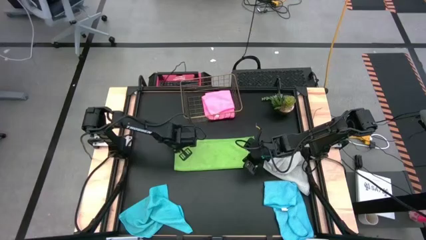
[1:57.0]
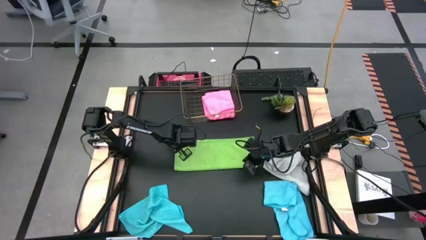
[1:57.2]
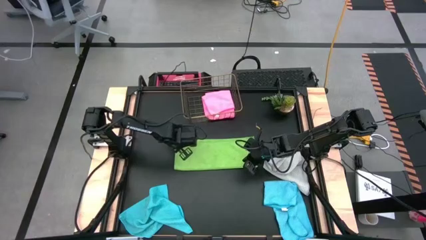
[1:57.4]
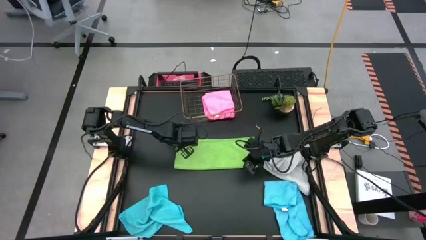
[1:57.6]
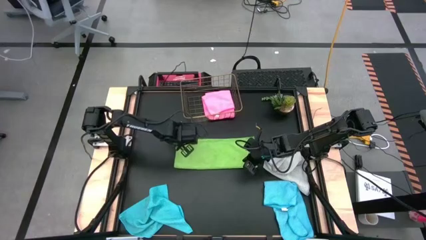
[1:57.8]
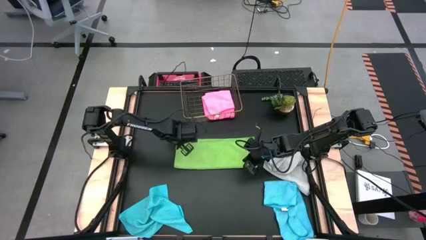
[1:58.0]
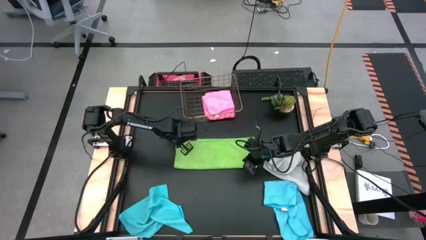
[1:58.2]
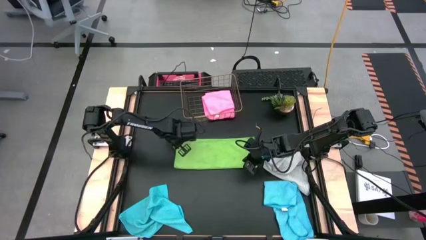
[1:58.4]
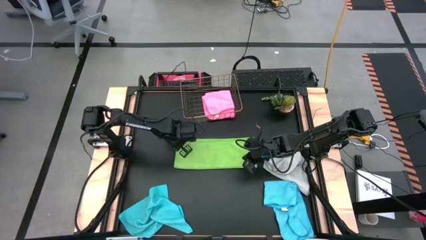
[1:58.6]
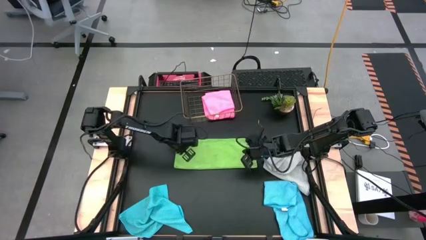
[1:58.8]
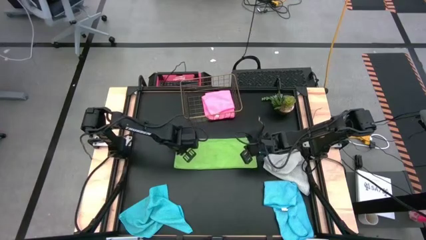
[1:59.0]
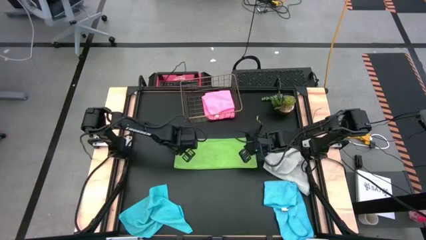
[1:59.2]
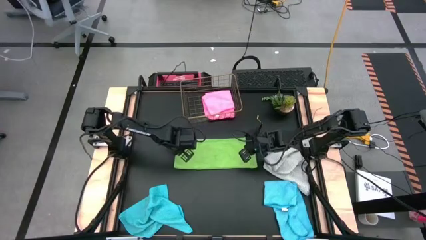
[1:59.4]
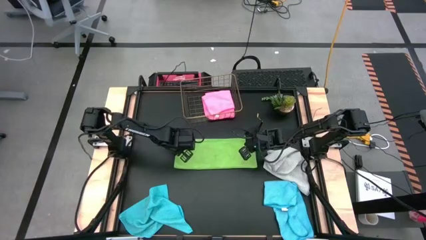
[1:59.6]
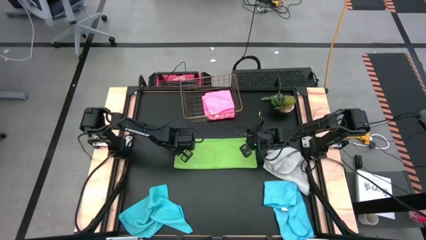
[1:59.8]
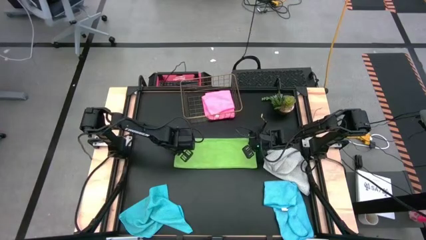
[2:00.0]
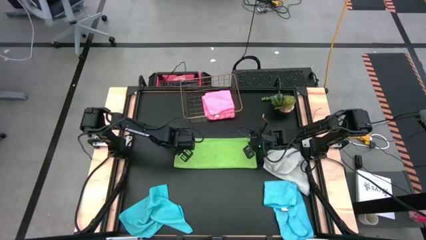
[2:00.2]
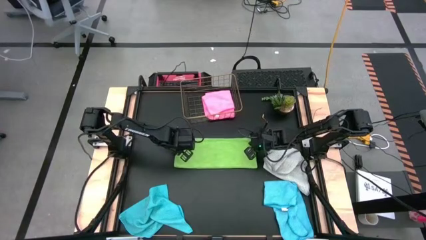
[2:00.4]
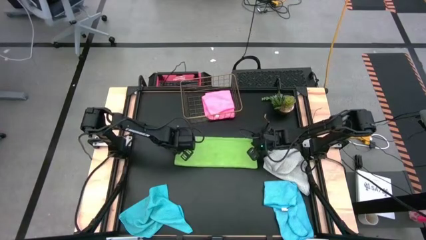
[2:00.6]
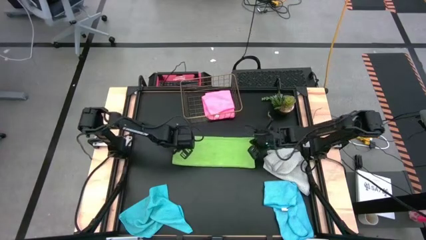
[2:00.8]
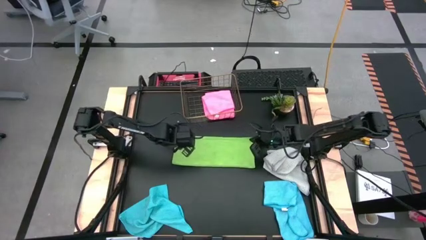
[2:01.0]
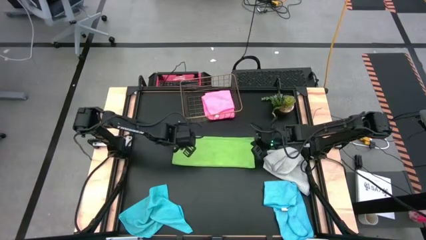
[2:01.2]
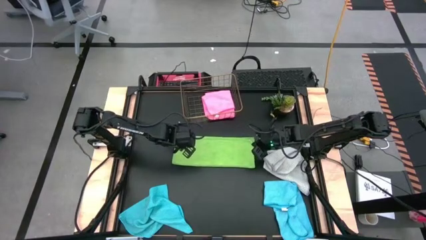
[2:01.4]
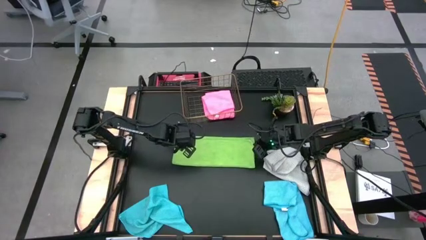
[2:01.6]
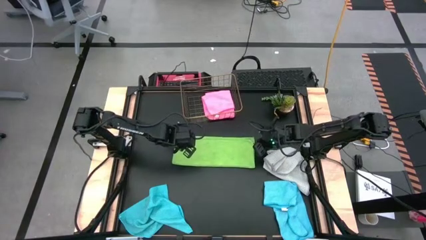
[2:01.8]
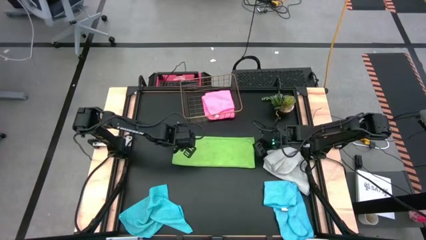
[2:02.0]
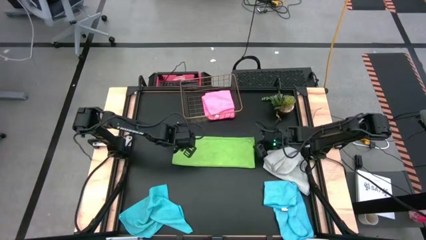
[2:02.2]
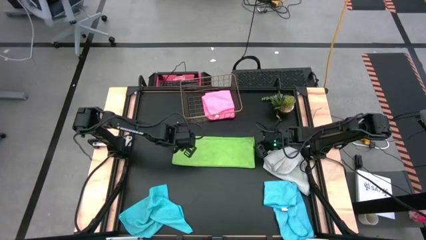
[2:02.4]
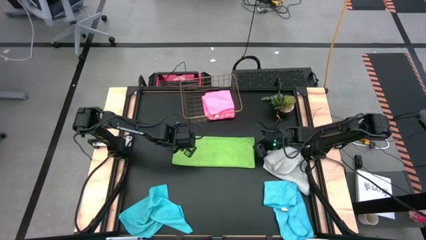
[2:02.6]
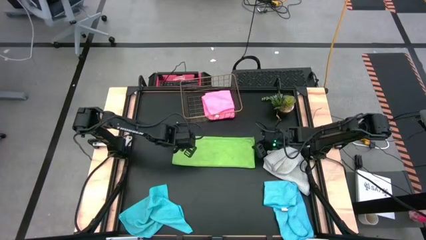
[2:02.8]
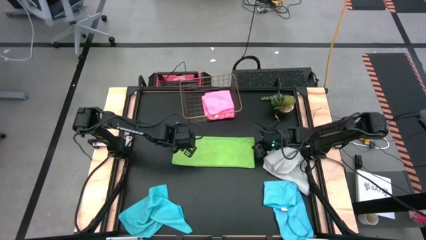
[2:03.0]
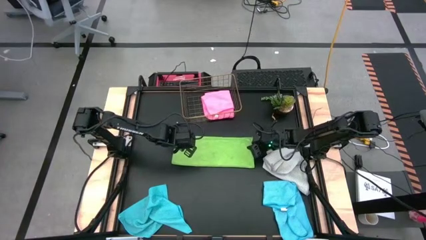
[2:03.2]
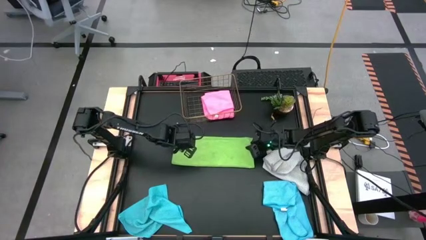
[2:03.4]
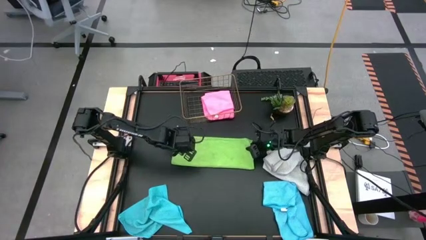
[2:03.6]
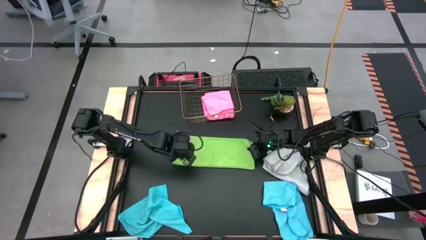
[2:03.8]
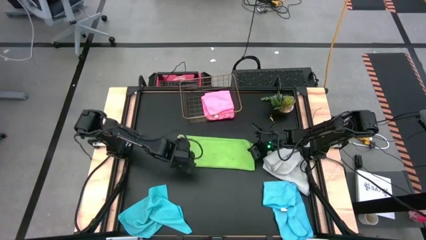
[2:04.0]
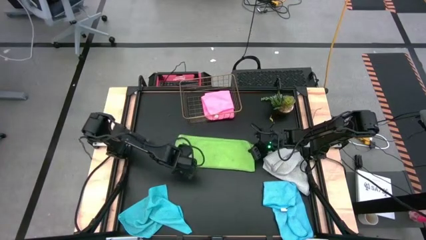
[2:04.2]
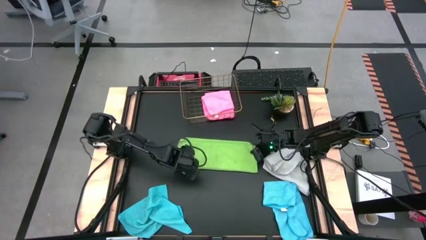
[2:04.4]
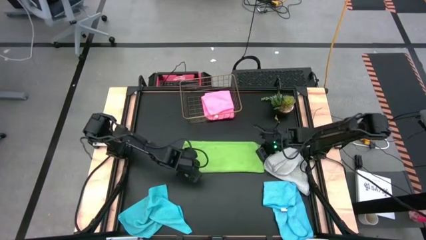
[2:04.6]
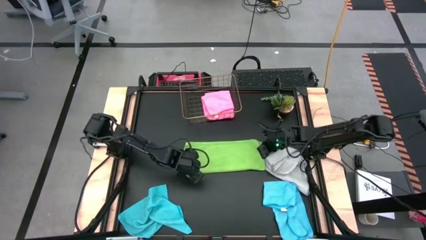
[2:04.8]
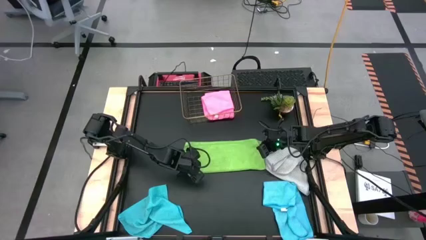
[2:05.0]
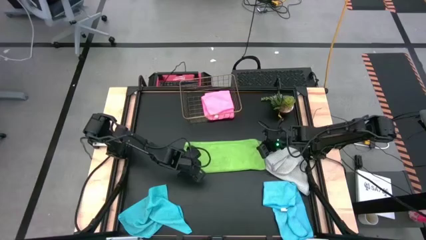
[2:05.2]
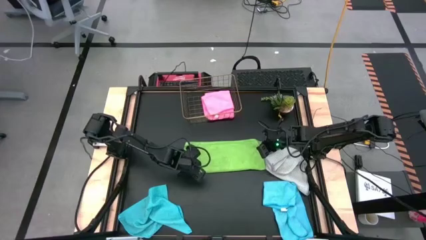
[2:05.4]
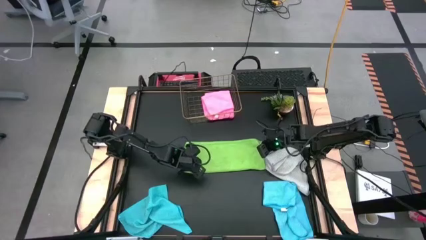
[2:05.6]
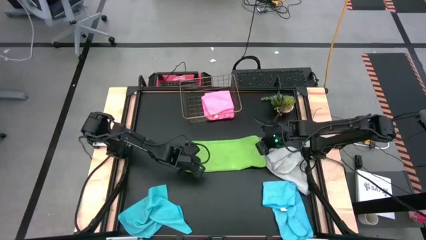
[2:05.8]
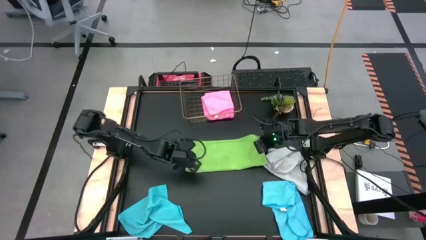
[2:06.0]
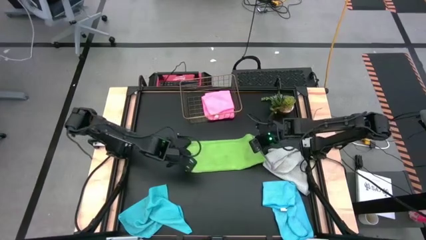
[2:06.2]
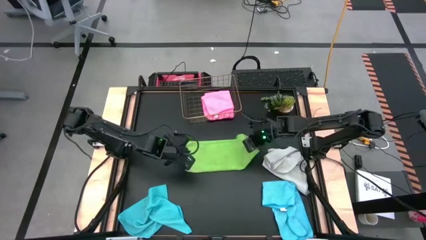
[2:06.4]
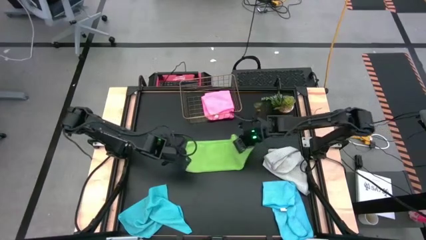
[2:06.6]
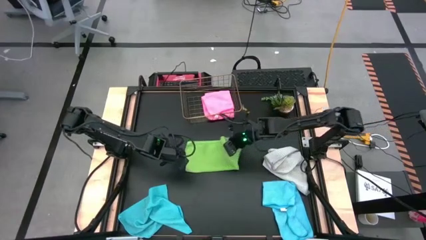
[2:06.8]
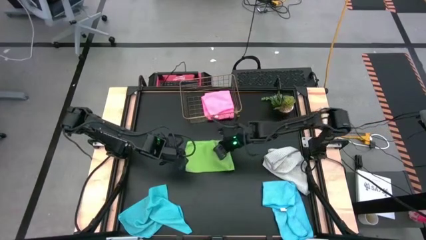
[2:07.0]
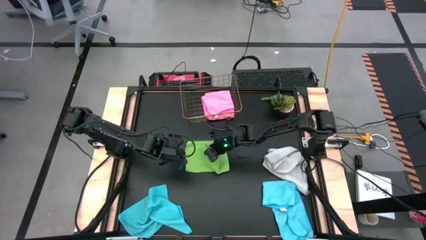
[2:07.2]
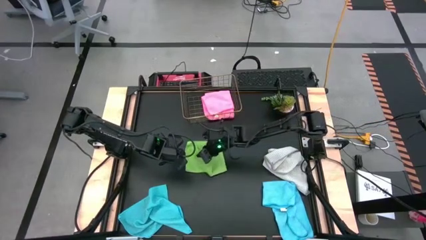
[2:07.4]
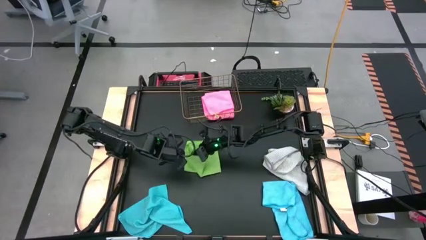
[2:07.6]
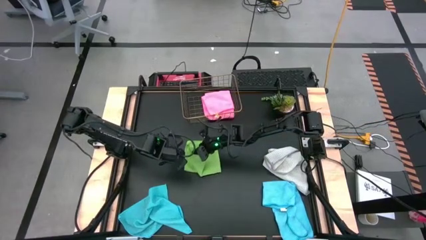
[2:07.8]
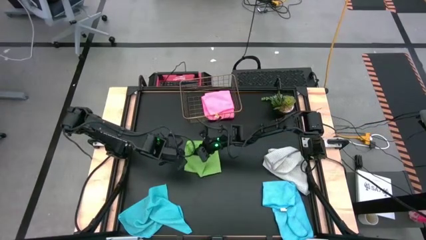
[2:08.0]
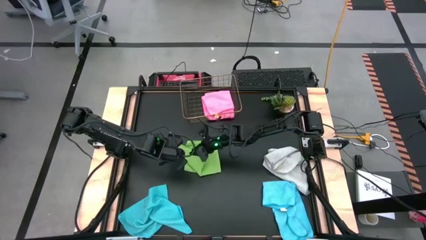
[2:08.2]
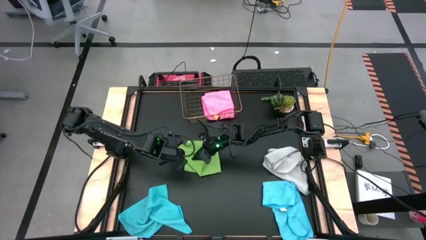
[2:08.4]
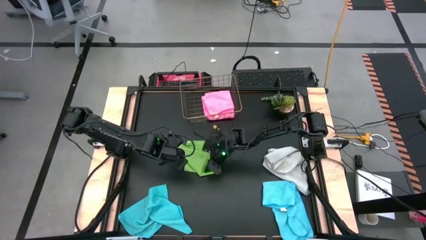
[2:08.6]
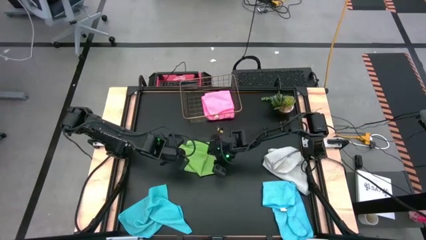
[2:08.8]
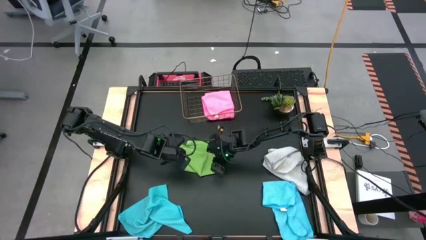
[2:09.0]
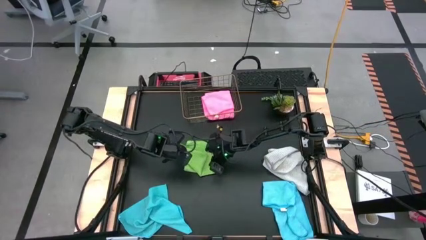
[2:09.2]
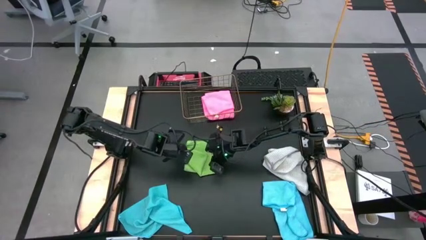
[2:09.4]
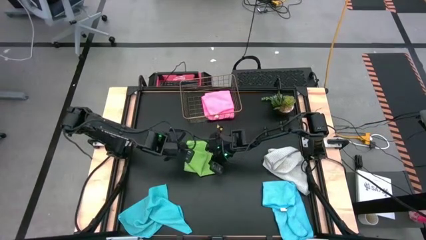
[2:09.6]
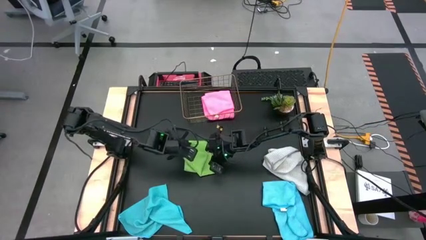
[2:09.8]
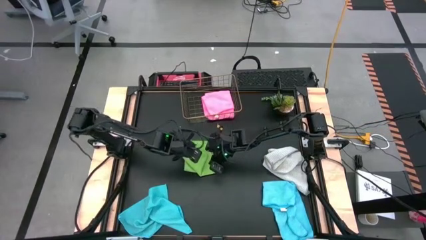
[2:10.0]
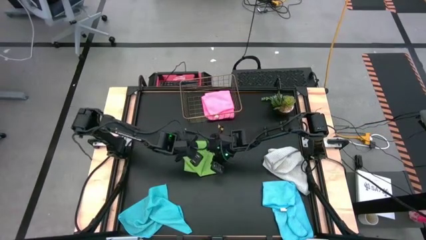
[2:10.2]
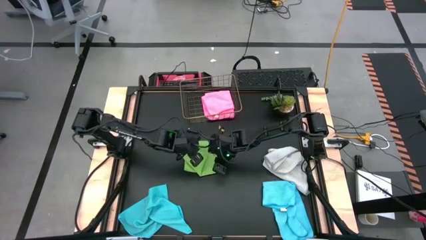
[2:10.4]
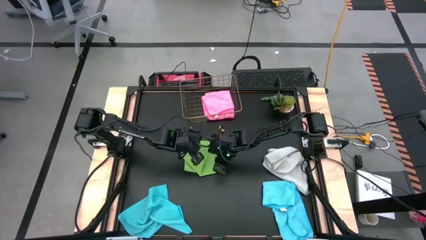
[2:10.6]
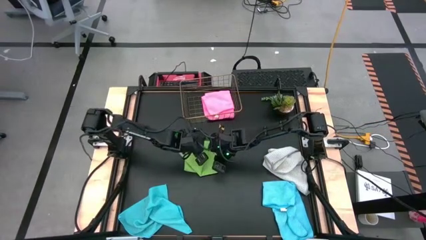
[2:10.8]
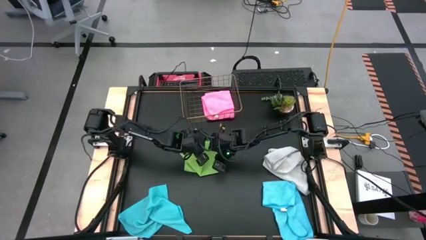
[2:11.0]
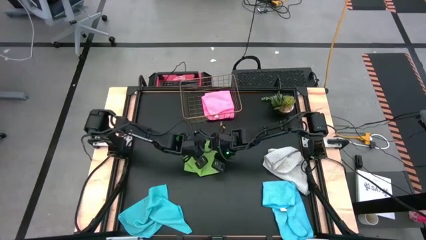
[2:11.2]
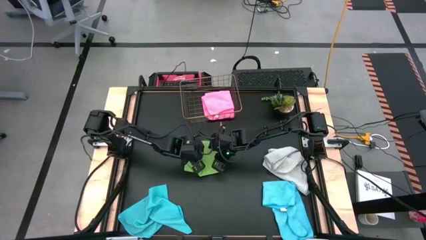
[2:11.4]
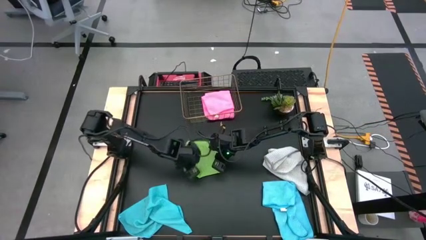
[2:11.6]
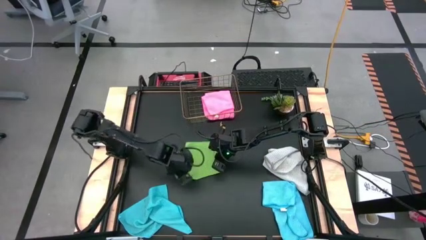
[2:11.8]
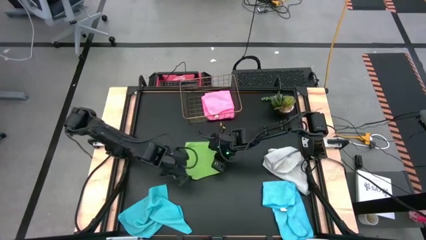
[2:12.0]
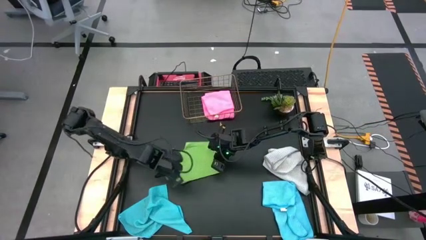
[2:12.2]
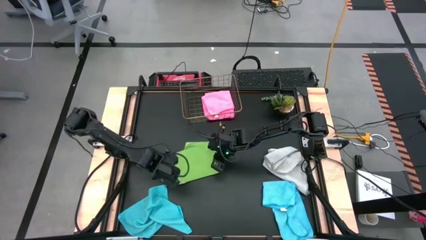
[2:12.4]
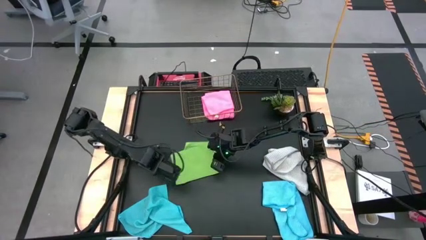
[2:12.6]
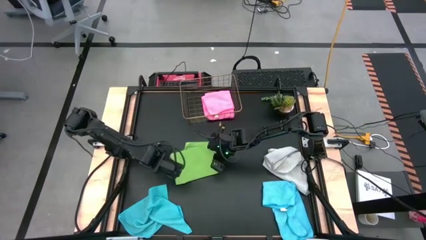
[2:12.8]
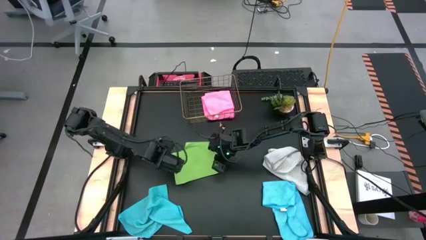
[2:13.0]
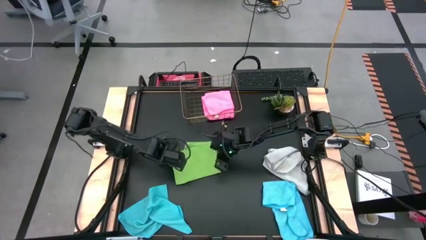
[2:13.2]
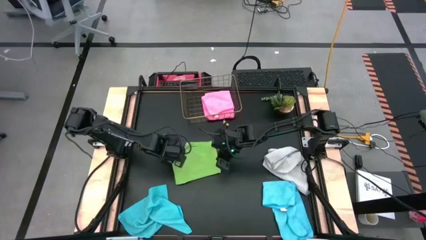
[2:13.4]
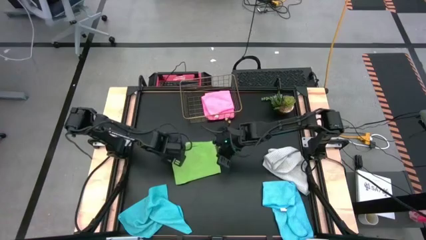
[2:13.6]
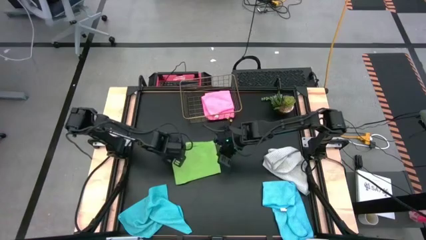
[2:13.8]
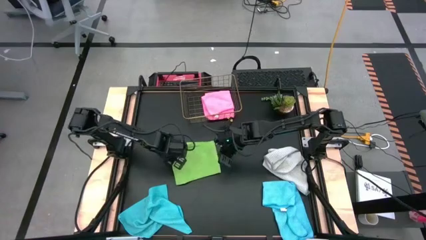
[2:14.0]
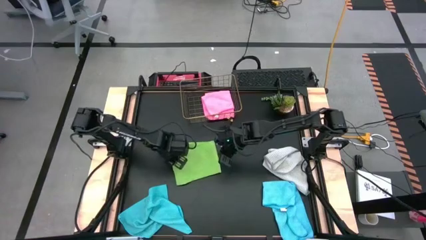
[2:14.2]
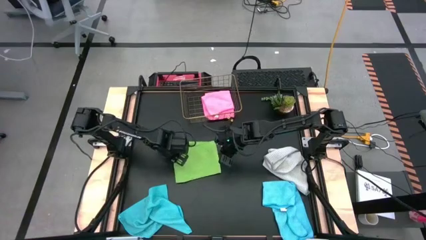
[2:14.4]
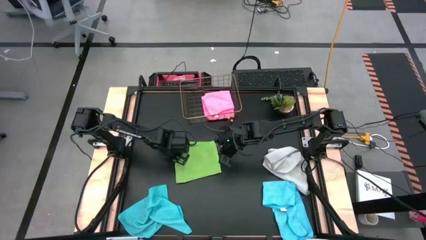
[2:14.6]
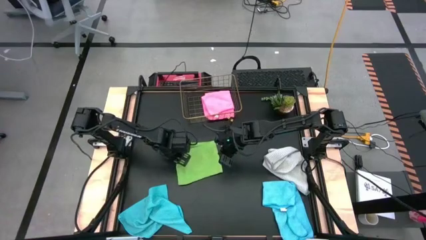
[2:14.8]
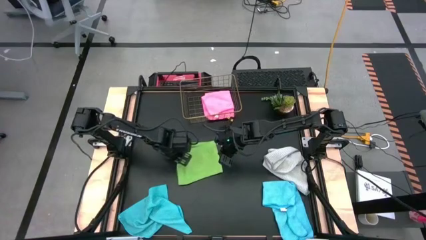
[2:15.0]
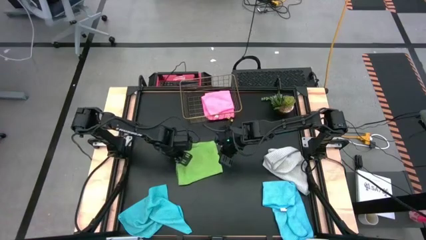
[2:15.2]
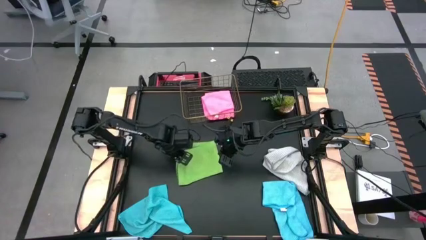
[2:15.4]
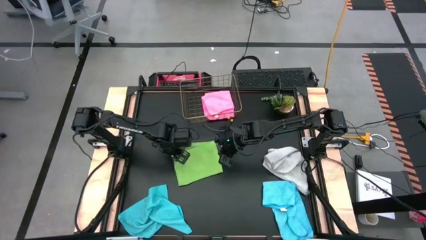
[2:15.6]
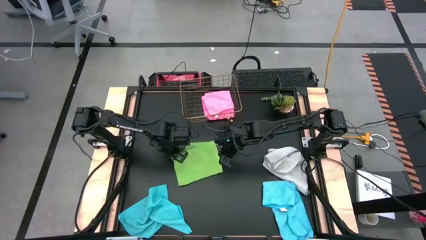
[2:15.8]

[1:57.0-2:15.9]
Task: Fold microfiber towels
Fold the green microfiber cloth in quarters
